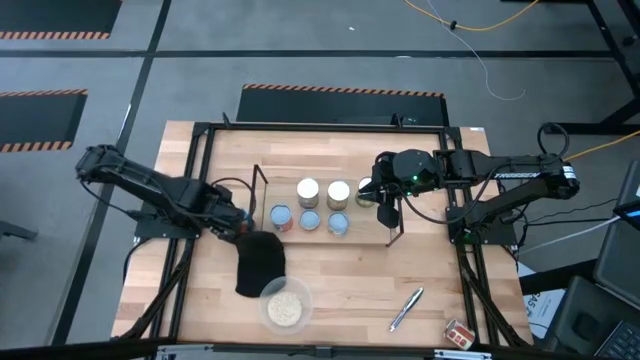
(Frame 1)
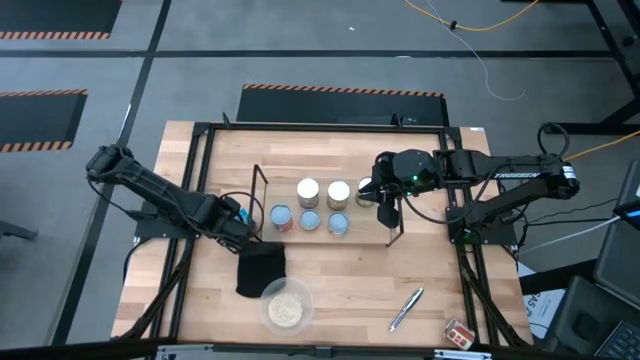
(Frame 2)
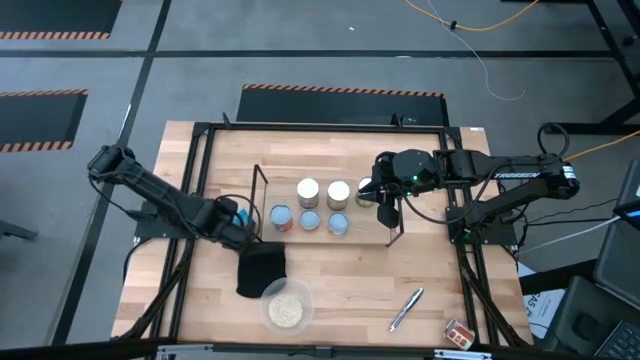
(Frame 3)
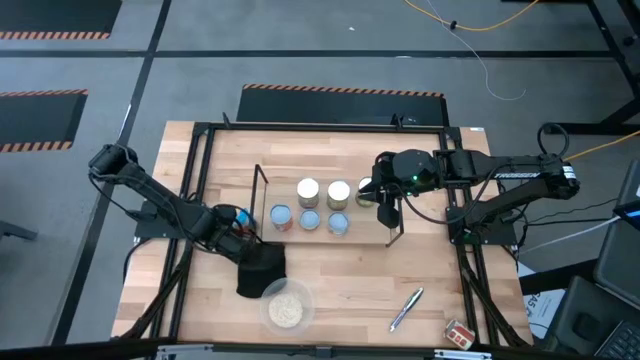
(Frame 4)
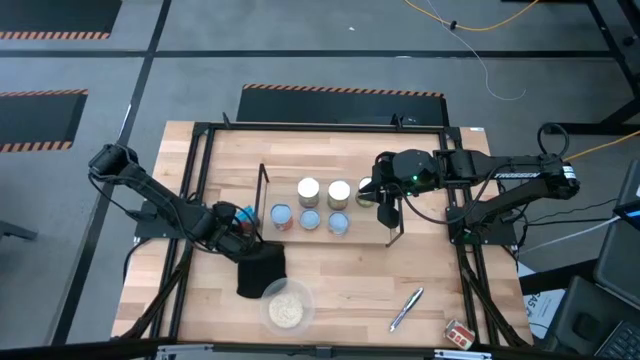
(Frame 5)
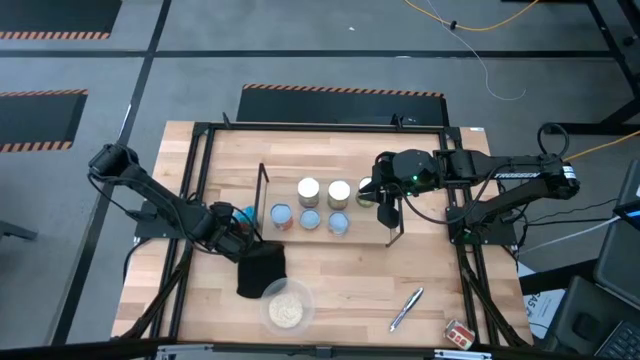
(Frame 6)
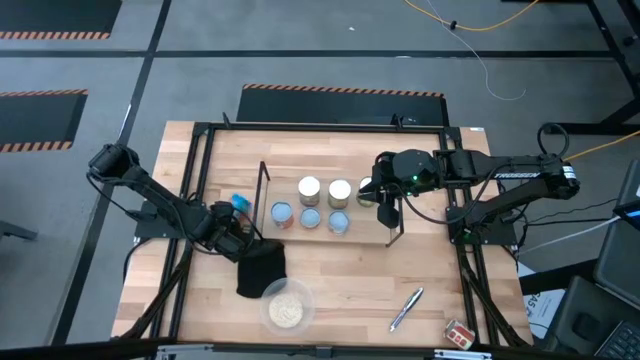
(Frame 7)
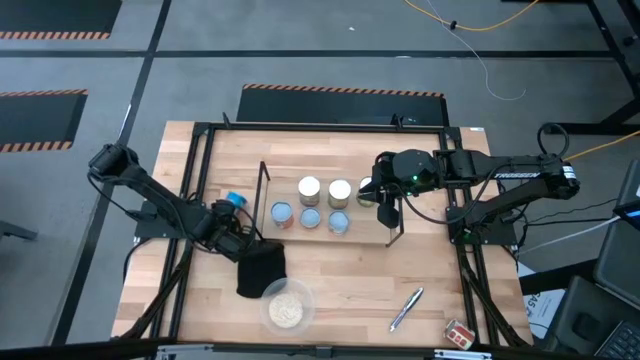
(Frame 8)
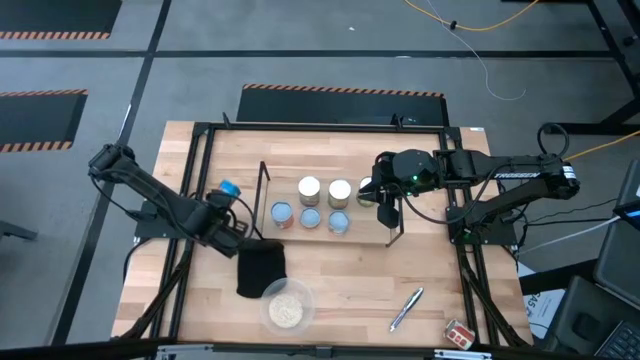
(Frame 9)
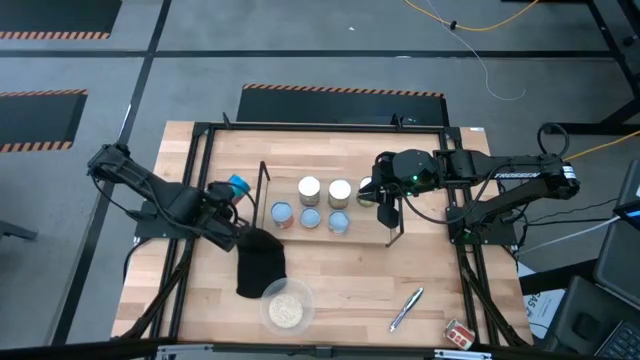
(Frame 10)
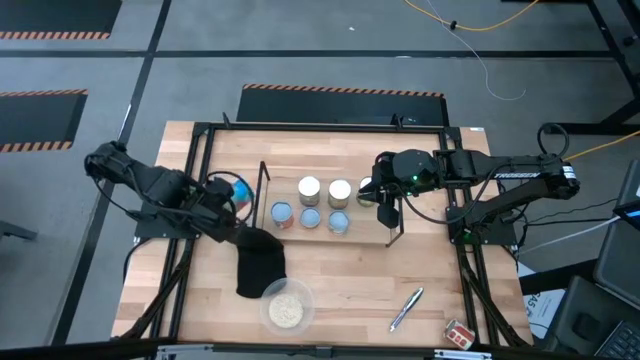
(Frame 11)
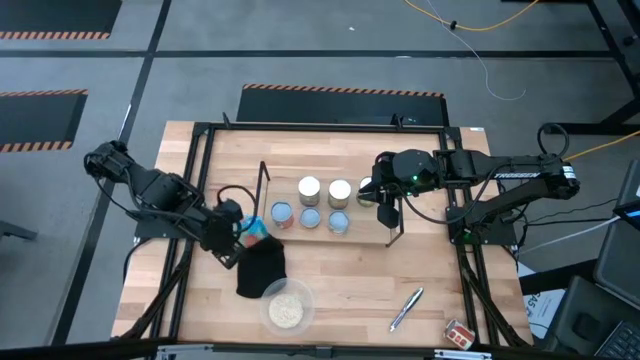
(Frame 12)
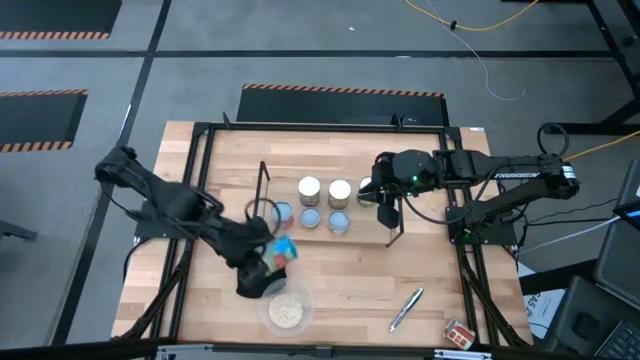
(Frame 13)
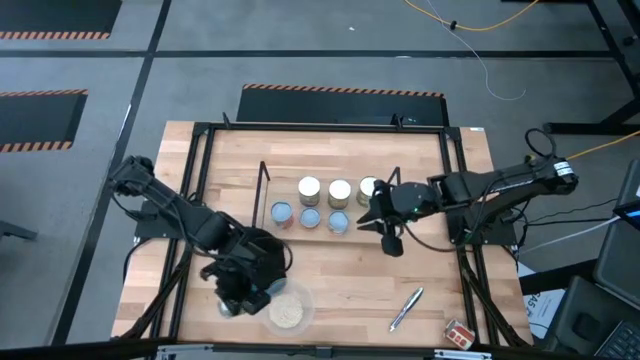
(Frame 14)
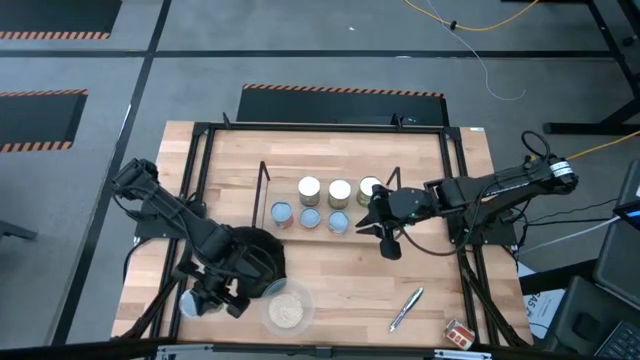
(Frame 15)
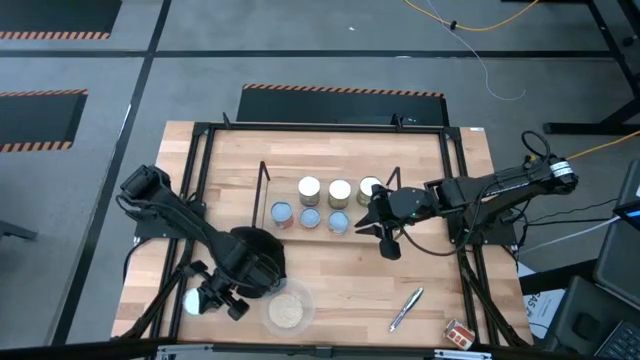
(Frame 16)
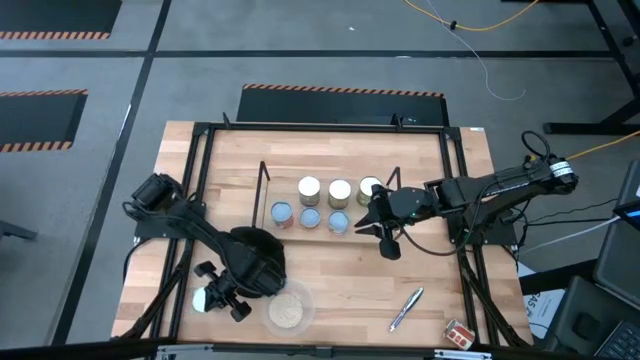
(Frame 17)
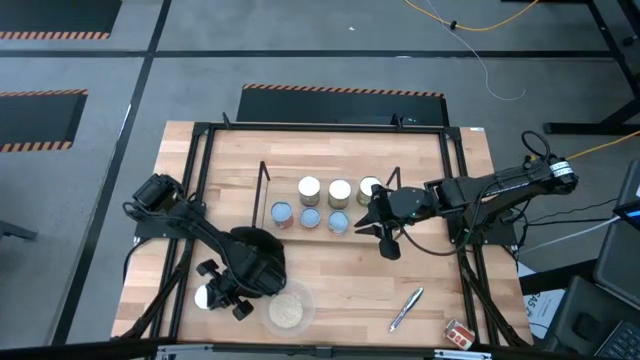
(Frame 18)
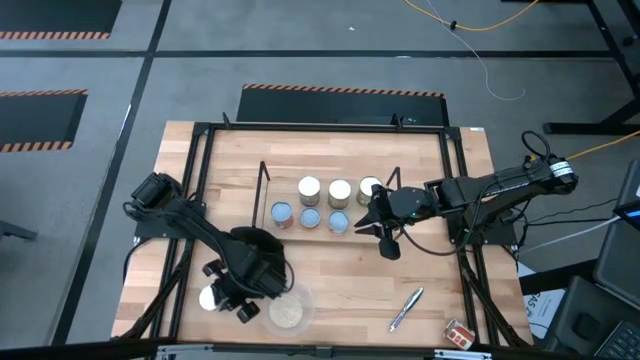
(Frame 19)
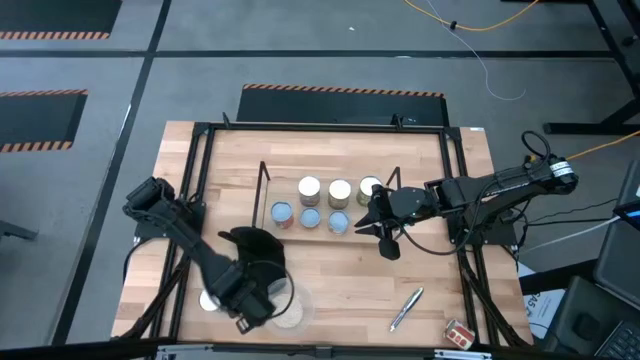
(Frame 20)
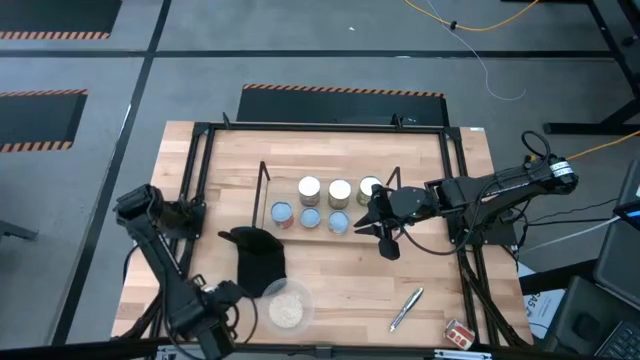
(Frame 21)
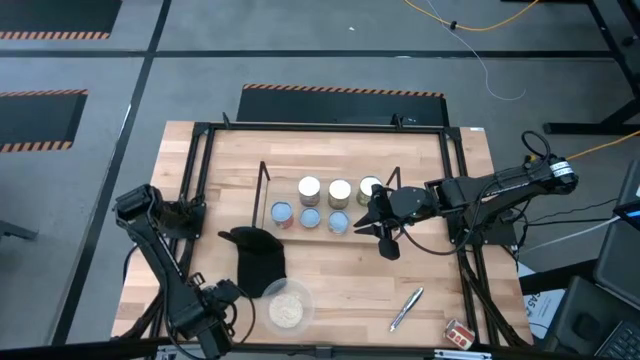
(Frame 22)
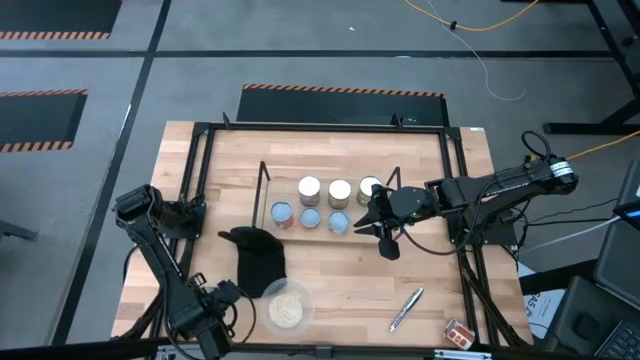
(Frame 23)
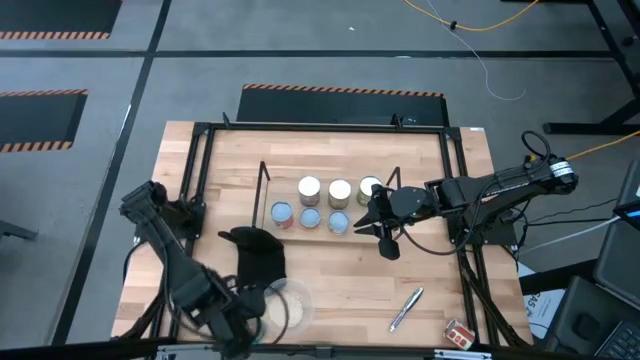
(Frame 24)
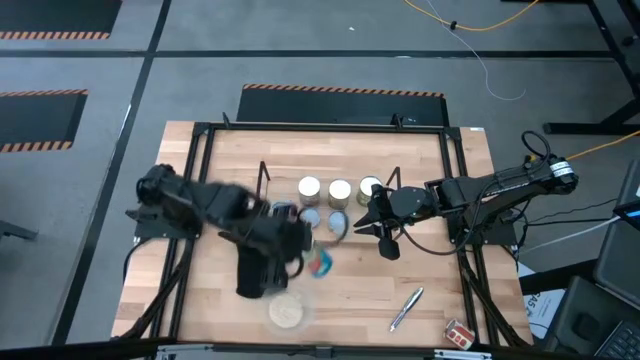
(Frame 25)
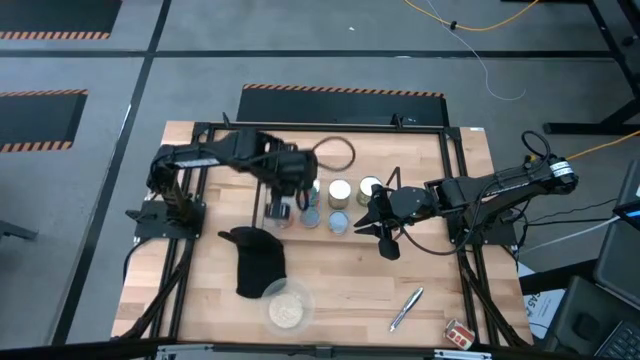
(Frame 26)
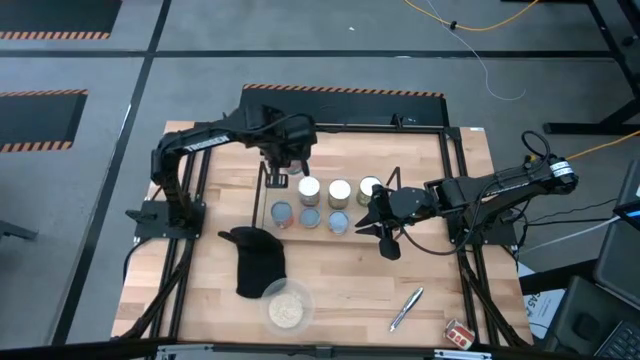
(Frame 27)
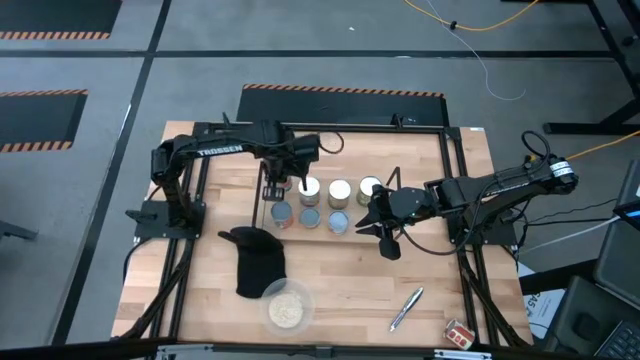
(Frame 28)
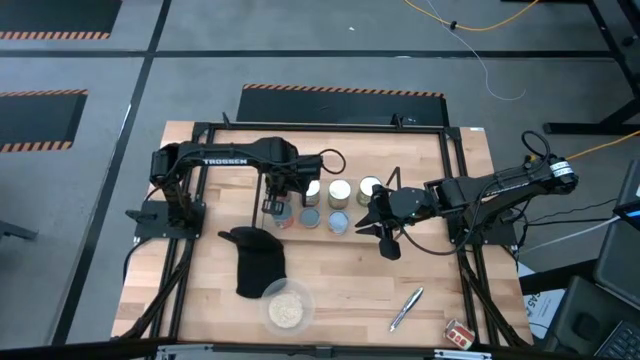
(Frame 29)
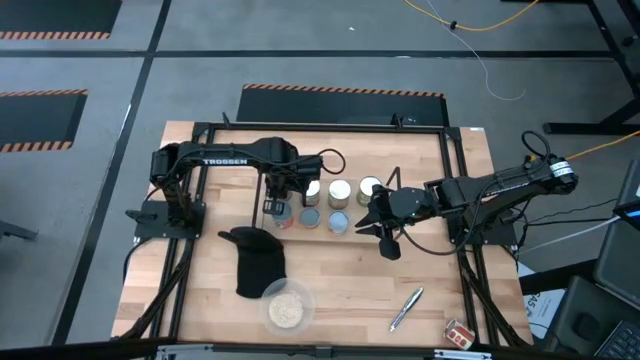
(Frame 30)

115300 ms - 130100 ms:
Task: Pick and place cans onto a shelf
Put the large canned tomatoes on the shelf

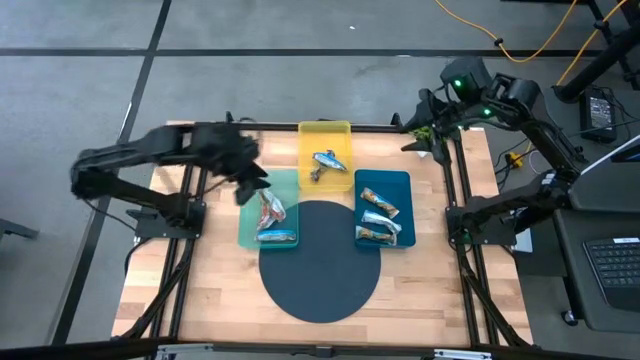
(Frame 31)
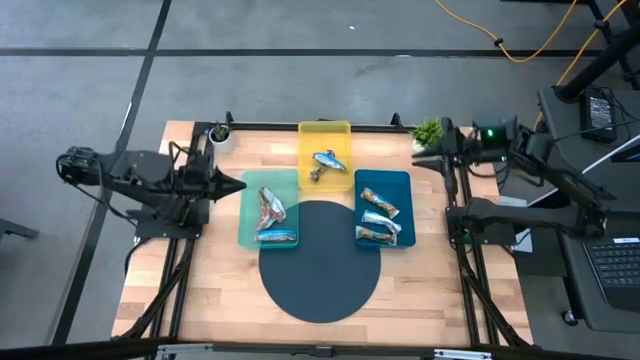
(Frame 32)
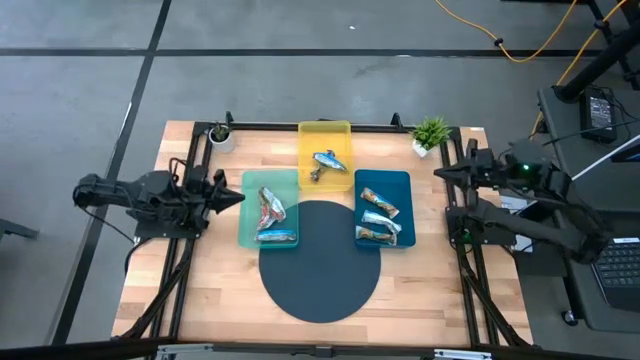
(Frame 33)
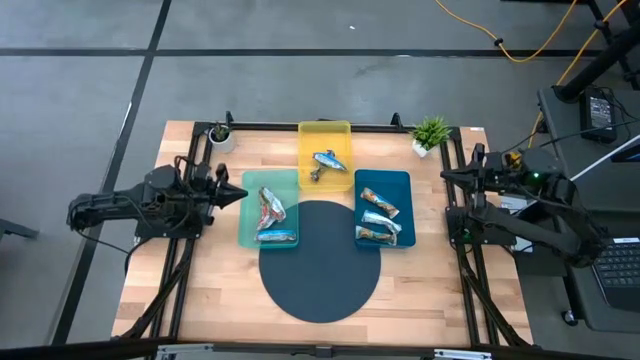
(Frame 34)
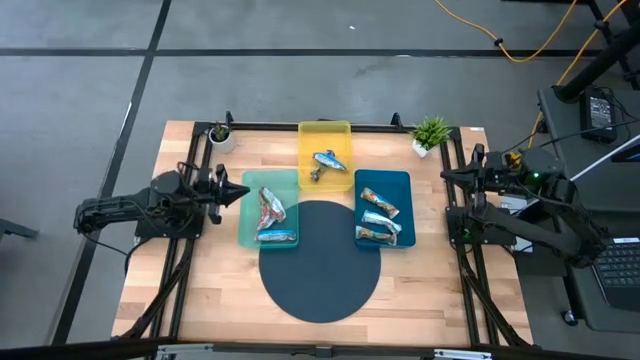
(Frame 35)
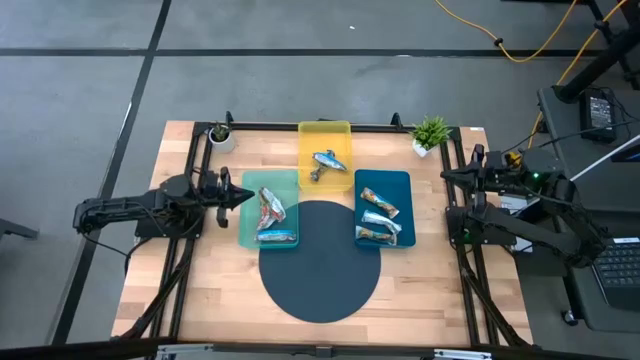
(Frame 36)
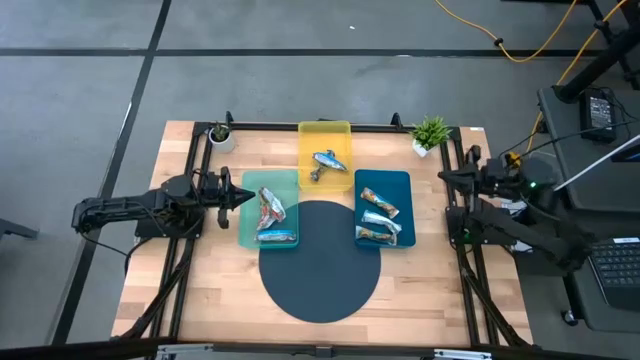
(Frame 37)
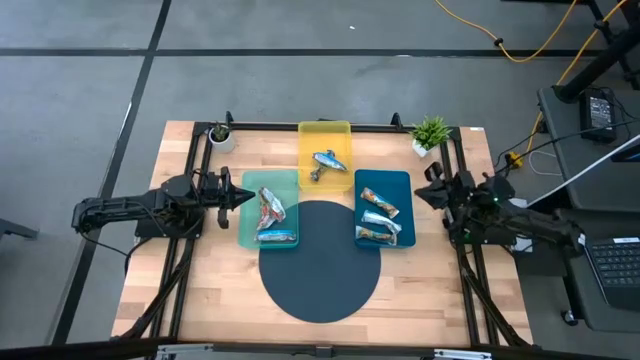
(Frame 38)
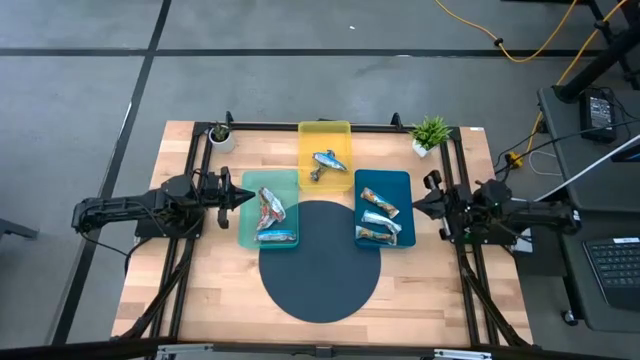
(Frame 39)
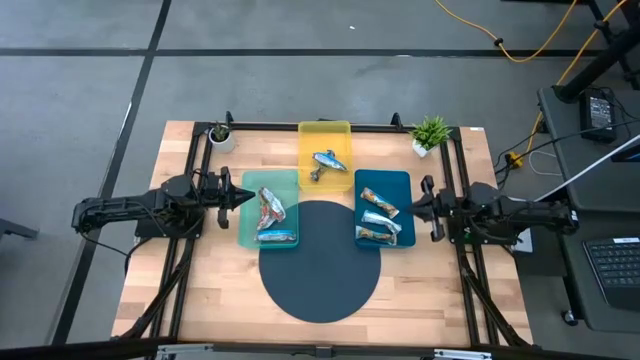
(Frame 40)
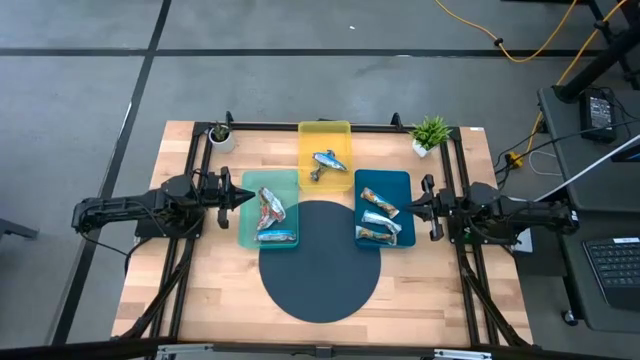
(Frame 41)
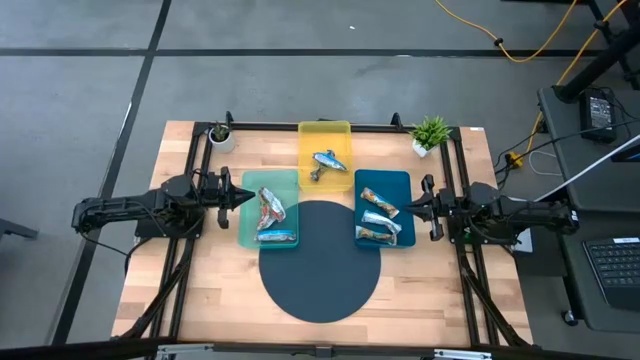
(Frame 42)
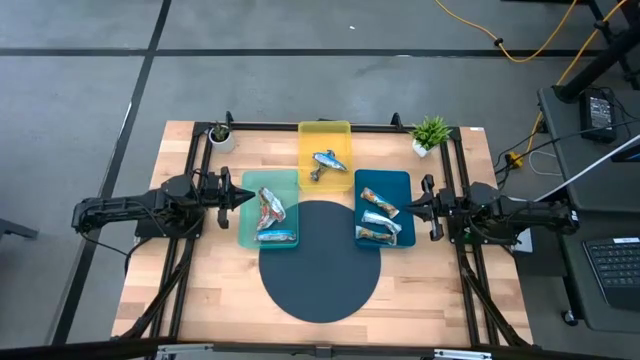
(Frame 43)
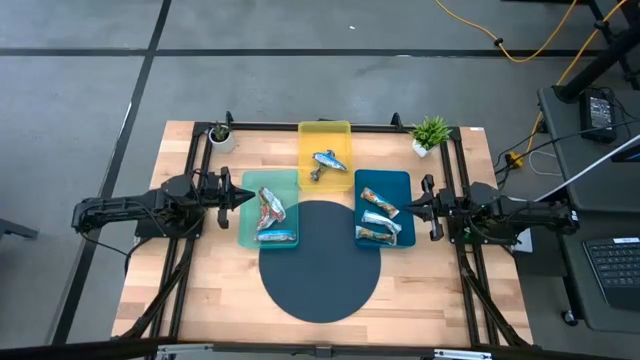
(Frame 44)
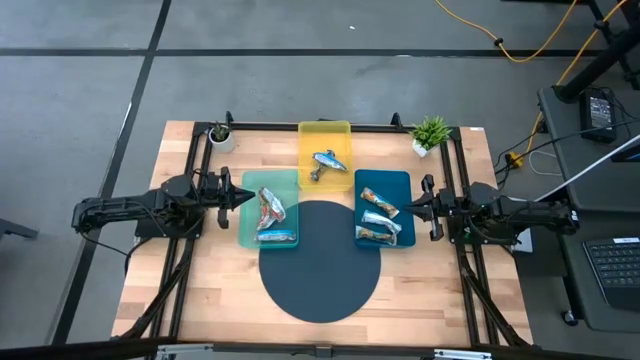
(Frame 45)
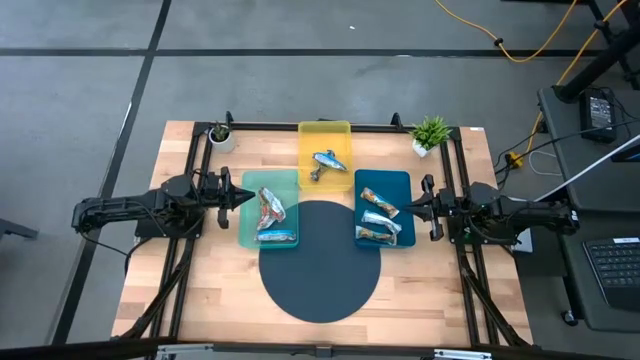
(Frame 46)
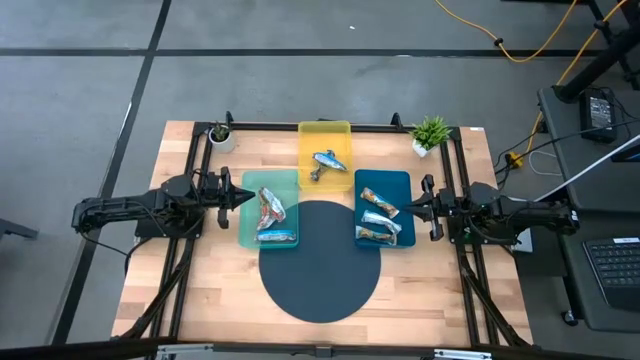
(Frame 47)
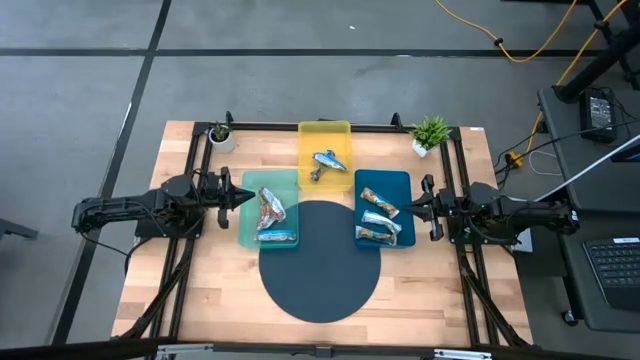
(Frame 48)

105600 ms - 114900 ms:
Task: Pick and place Granola Bars by type
Return to Home Position
